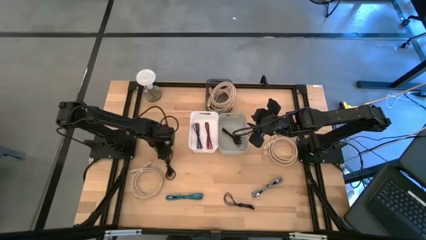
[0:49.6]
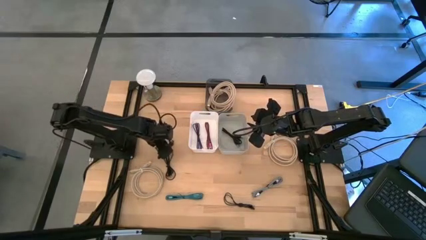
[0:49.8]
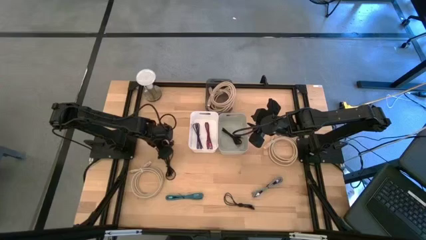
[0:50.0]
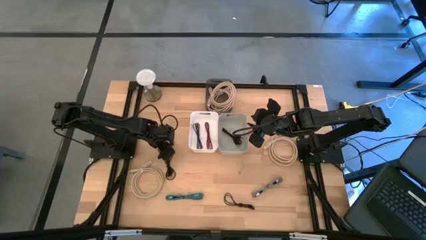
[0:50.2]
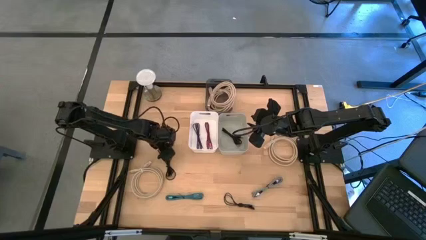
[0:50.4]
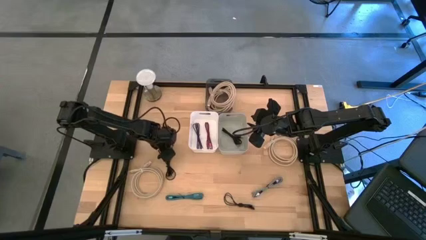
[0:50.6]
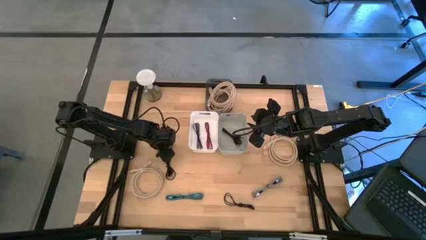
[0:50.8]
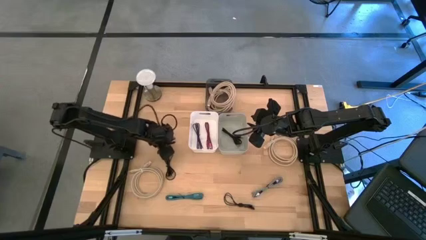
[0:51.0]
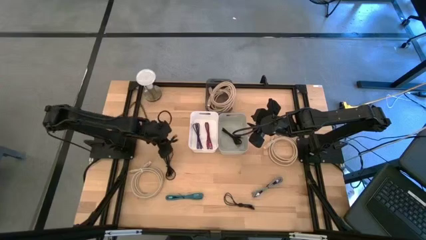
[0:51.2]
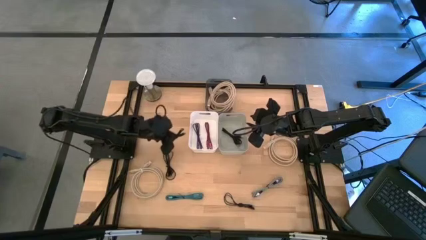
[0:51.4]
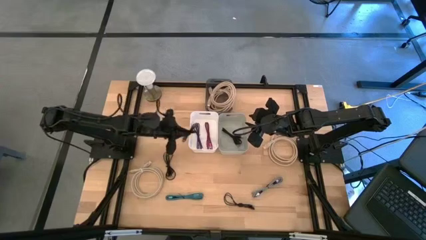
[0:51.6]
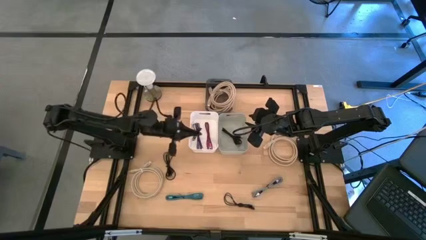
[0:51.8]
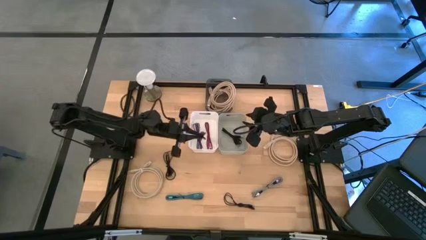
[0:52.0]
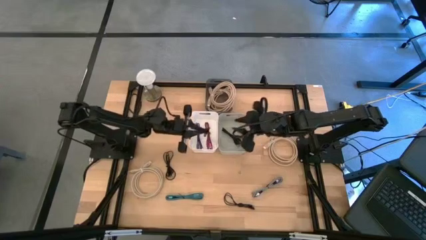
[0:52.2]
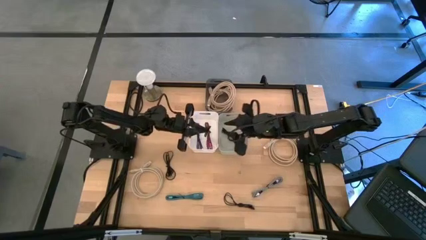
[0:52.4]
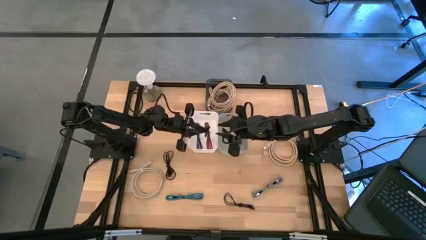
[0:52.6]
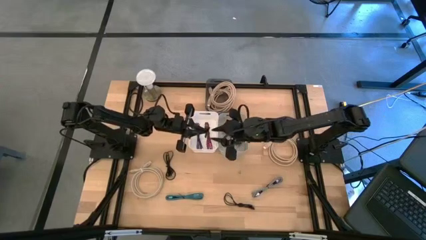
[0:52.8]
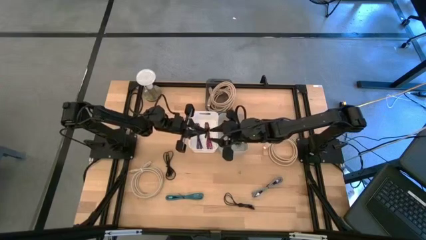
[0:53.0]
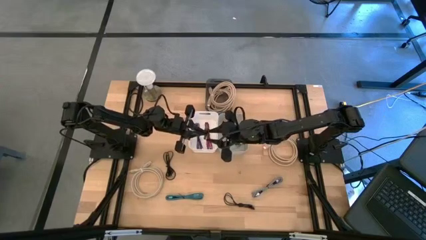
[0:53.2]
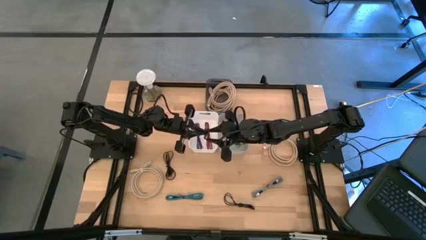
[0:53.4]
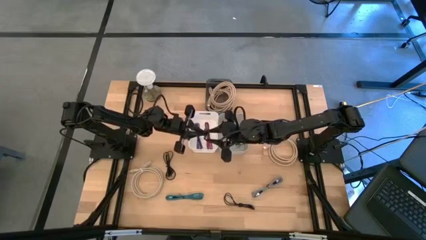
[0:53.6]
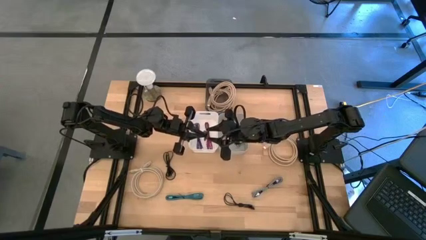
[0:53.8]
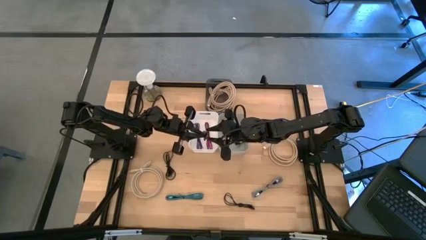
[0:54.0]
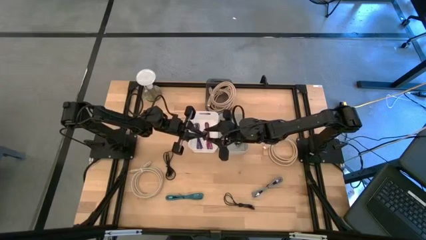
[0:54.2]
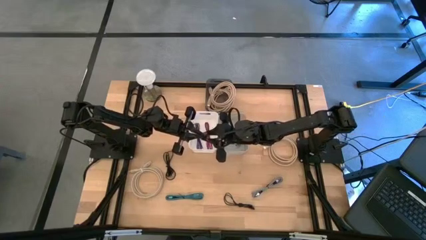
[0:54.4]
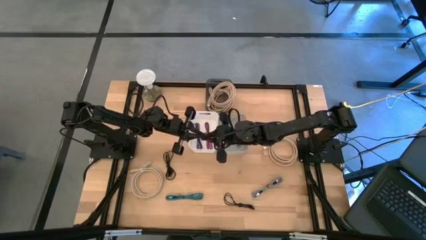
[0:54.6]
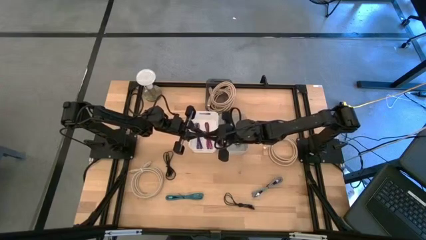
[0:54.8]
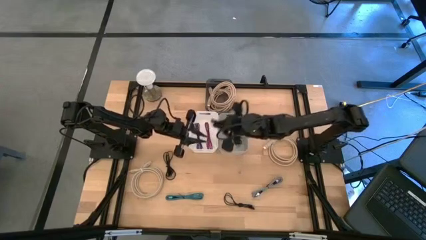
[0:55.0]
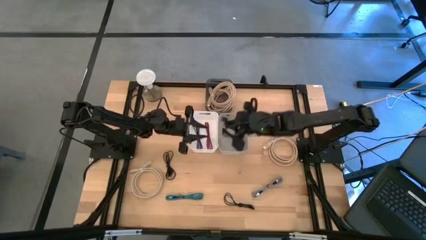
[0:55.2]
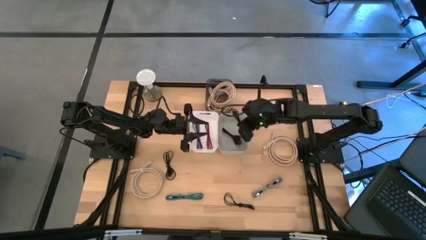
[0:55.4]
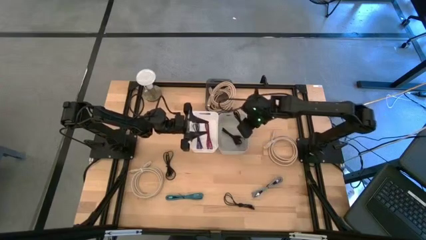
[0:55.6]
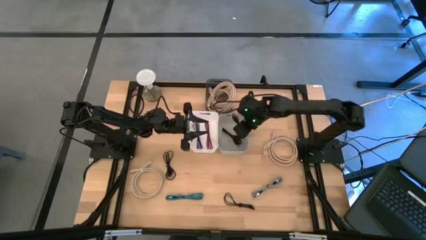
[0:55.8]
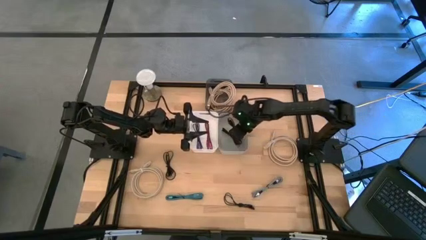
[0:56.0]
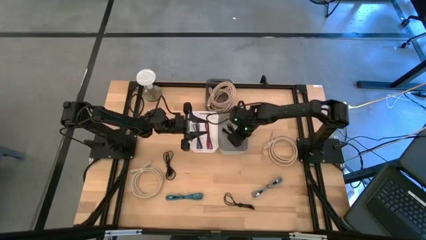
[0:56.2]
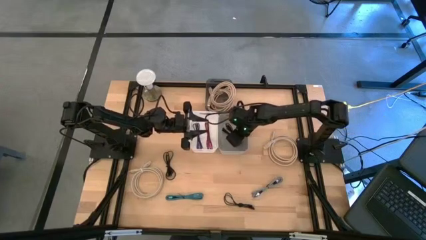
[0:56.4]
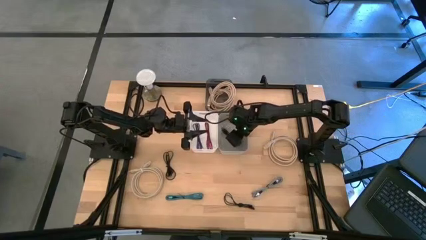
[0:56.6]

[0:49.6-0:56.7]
Task: Pick & Place USB Port
Put the black charger cable into the gray bin

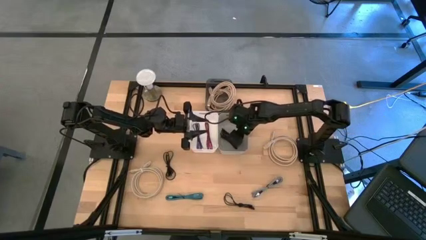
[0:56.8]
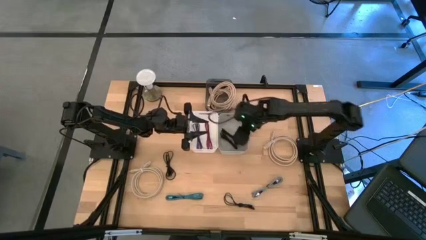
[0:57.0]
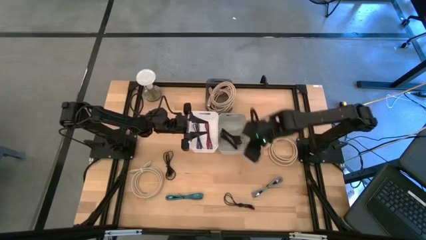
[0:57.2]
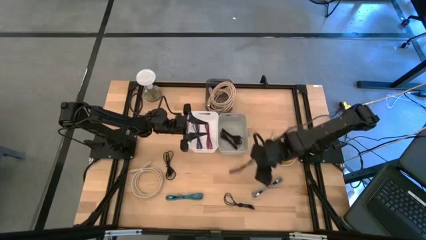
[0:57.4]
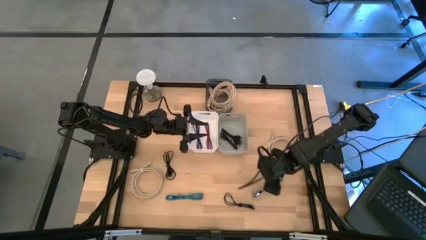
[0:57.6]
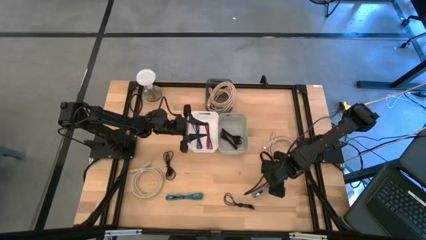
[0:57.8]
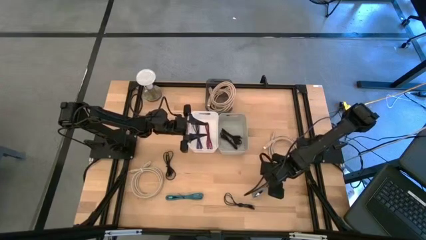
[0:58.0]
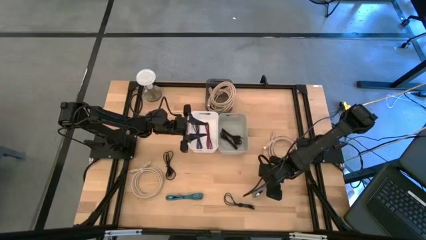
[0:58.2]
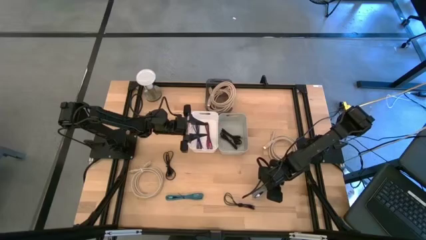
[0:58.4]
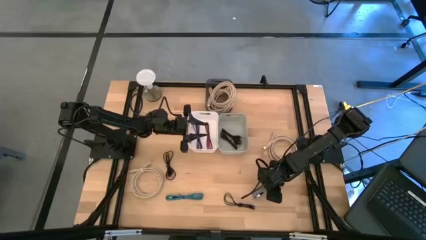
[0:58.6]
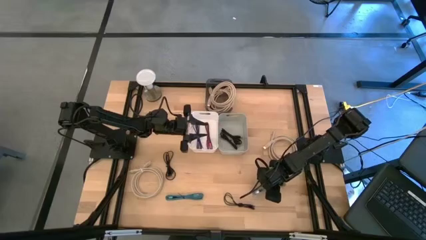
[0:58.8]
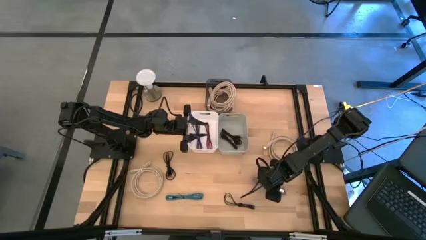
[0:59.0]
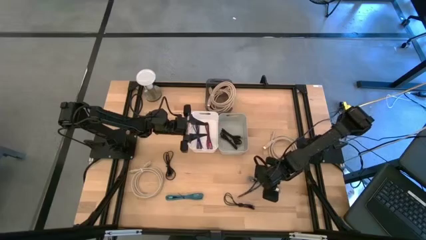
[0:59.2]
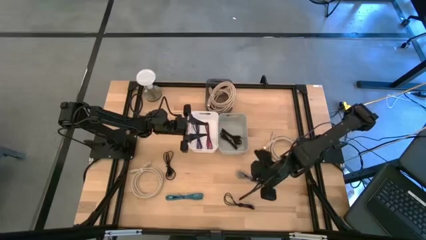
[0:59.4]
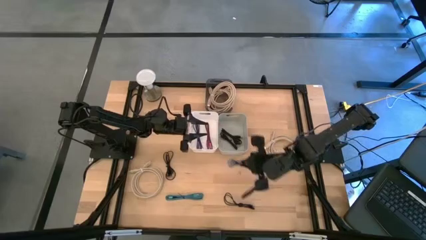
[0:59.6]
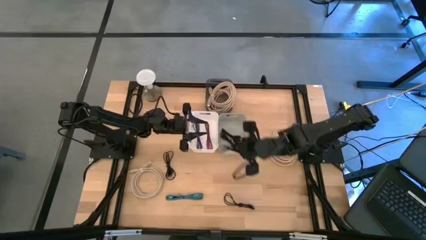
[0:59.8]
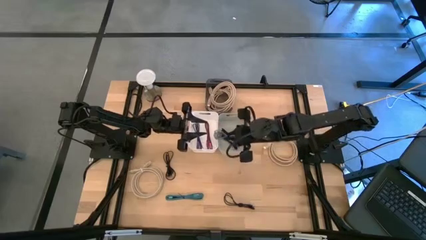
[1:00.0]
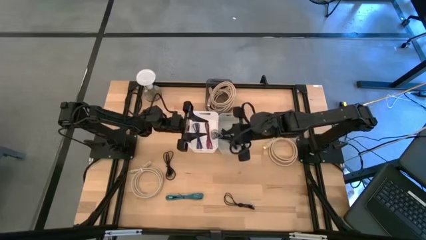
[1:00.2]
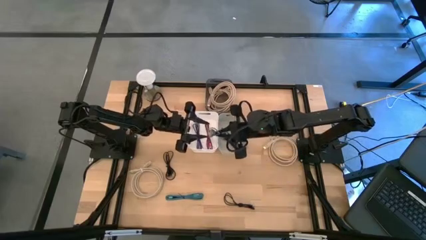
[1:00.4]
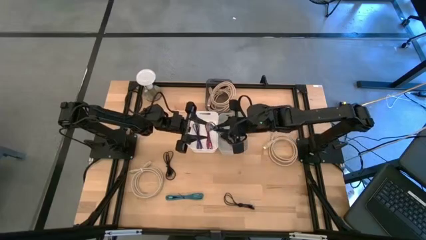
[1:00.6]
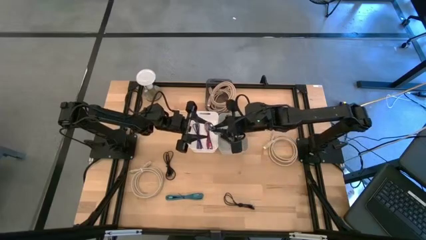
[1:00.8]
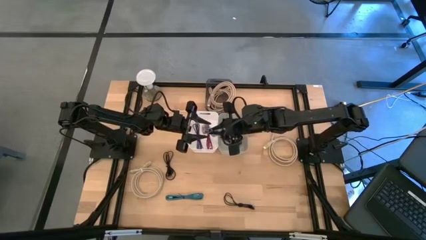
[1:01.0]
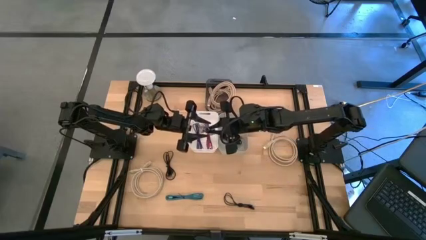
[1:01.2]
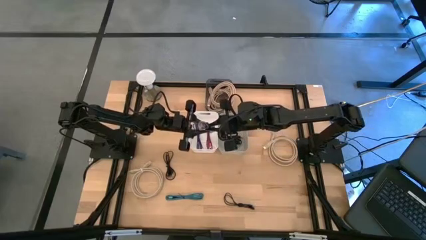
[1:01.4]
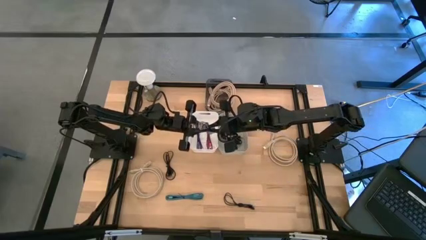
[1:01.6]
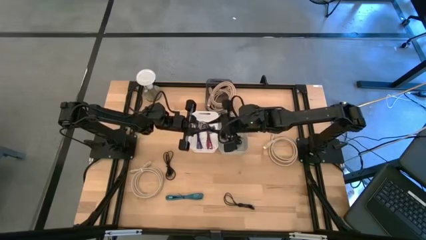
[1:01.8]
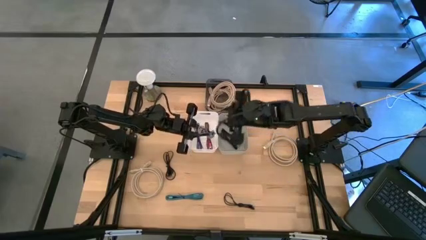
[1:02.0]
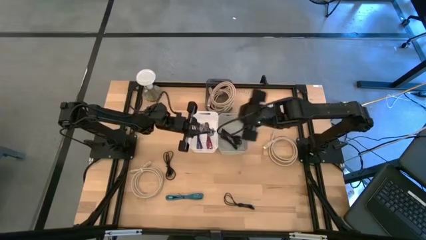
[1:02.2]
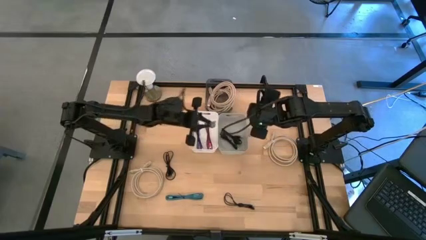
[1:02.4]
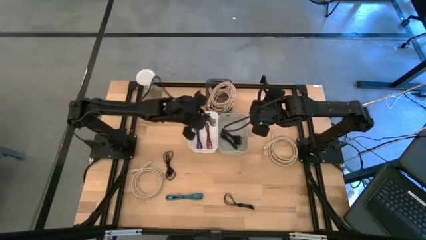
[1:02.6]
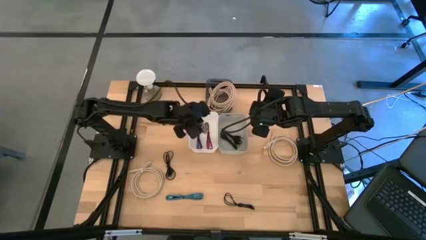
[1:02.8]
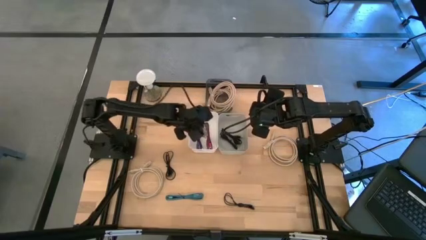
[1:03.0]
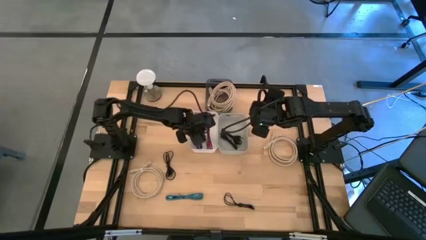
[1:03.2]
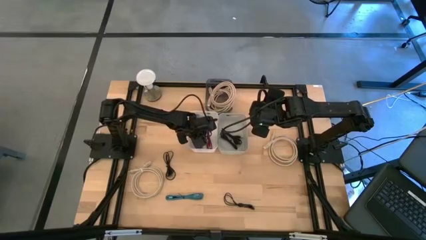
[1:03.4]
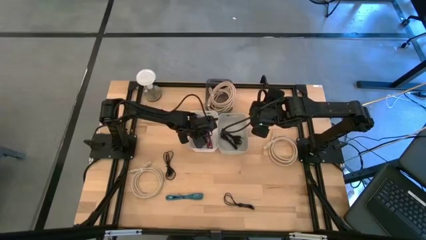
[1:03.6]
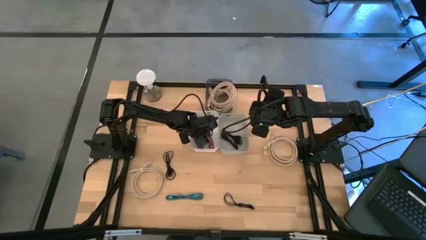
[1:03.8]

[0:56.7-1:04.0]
Put the white patterned charger cable into the white bin

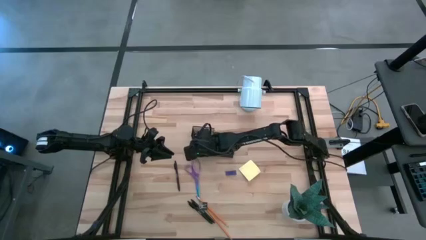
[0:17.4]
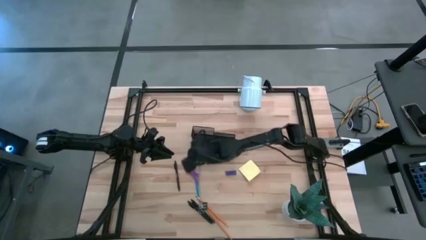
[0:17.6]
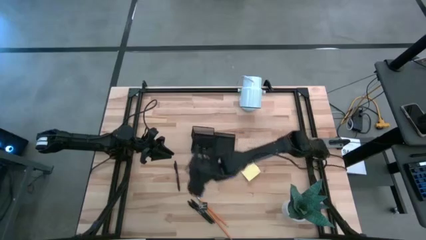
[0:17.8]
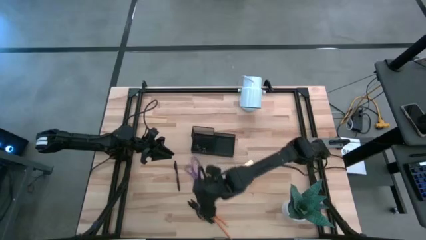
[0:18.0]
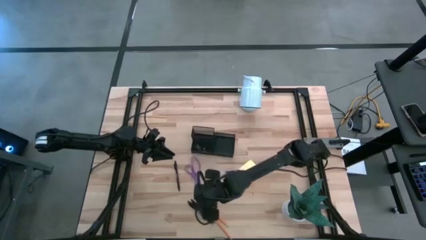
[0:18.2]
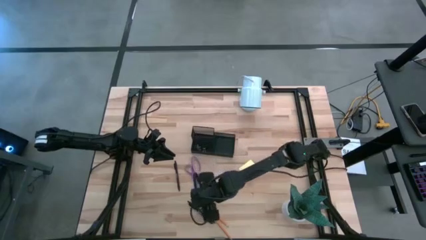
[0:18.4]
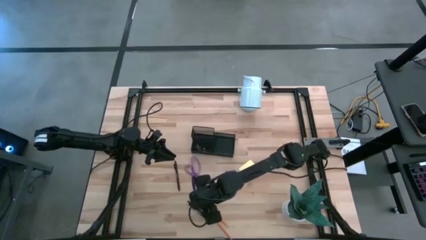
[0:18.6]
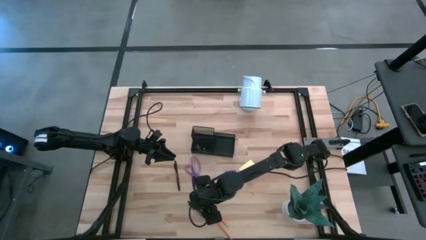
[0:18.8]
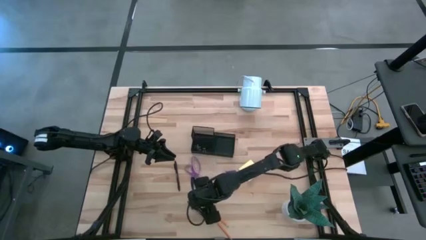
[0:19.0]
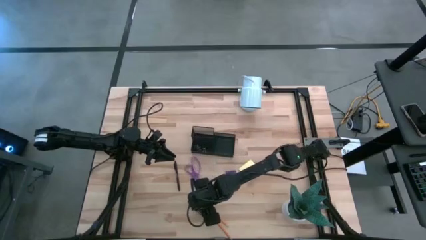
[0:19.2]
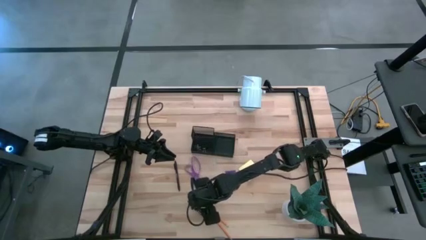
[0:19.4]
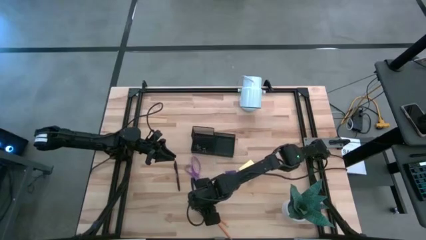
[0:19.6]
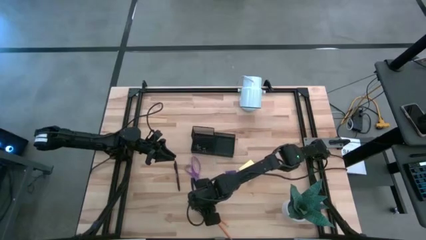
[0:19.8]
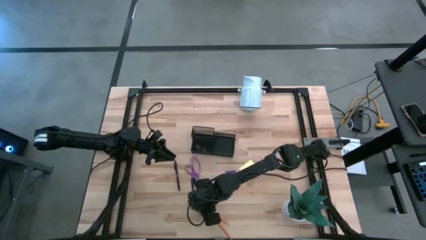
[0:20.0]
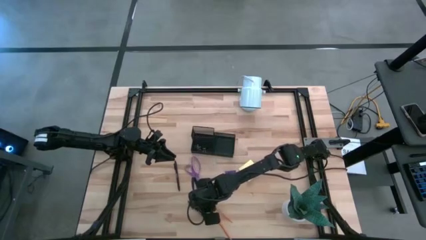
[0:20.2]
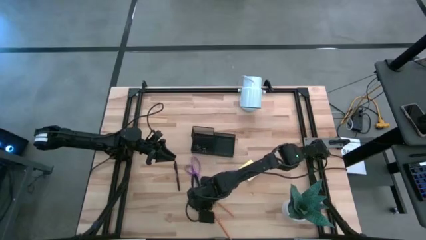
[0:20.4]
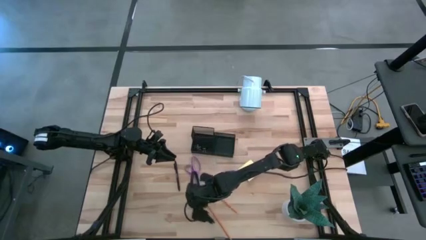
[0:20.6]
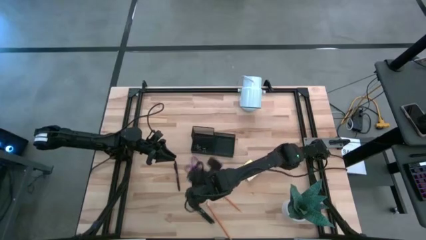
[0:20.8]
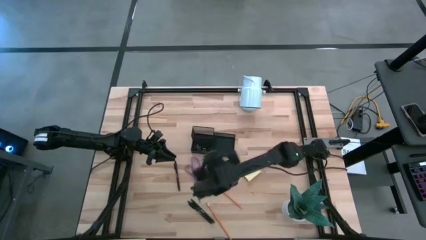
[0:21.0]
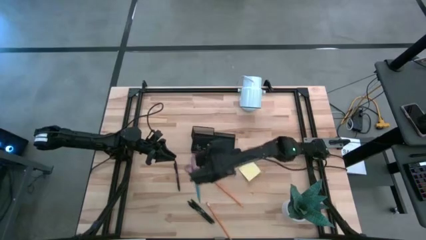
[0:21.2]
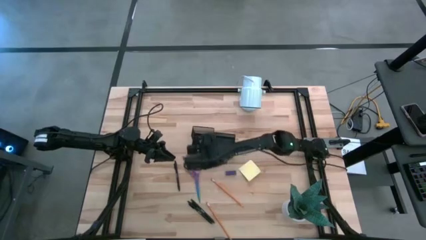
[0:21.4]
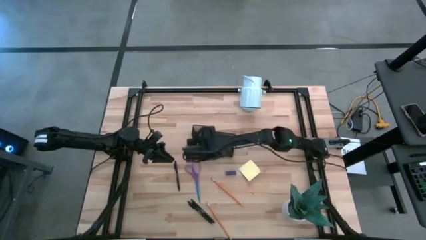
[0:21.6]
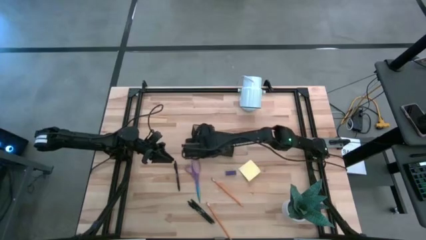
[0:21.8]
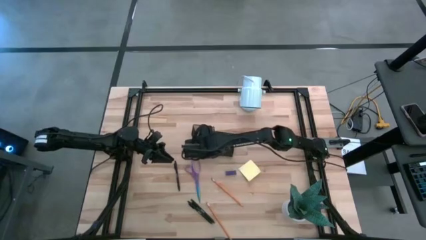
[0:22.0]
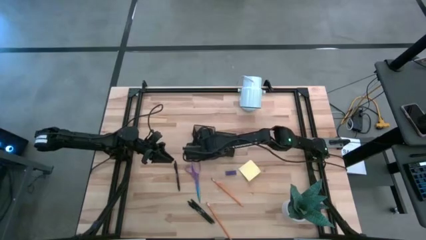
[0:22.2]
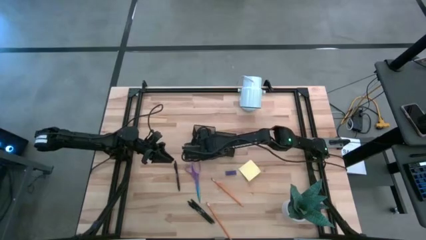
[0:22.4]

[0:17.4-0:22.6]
Task: Pick and place office supplies into organizer
Put the black binder clip into the black desk organizer
